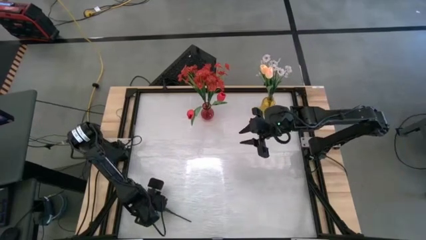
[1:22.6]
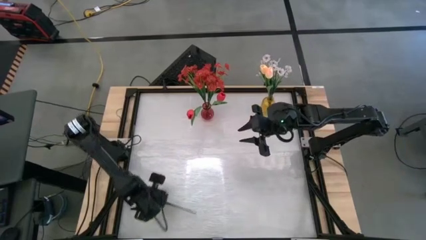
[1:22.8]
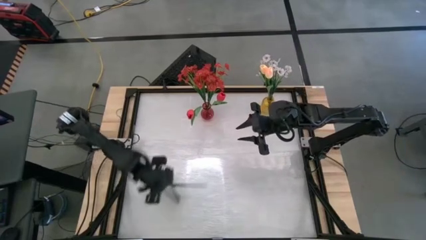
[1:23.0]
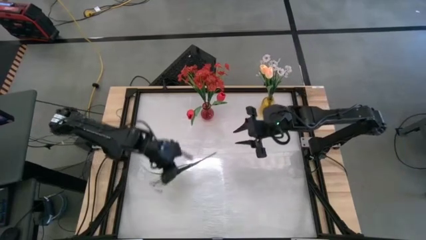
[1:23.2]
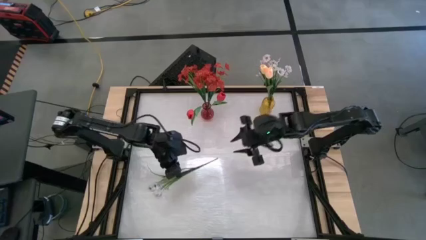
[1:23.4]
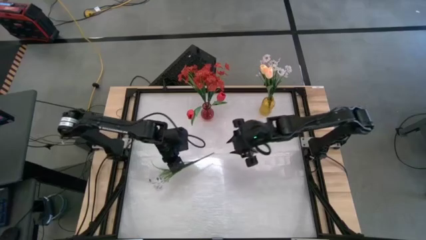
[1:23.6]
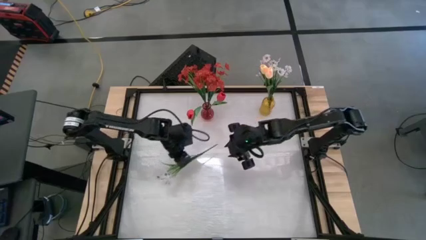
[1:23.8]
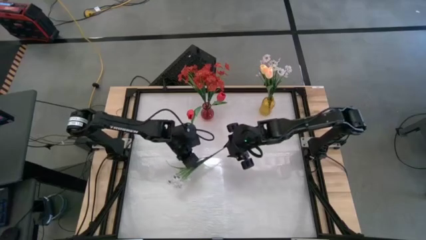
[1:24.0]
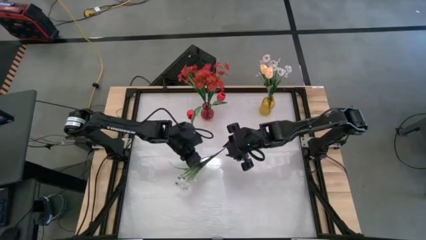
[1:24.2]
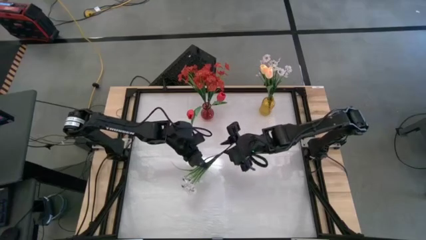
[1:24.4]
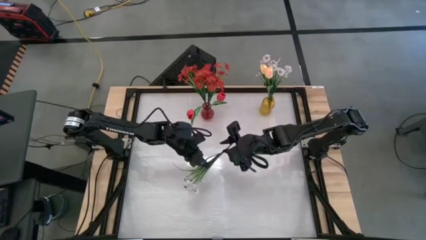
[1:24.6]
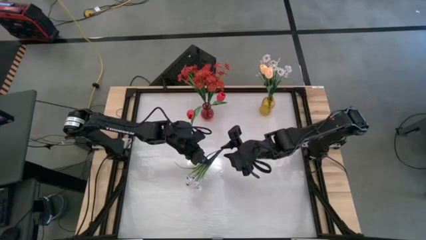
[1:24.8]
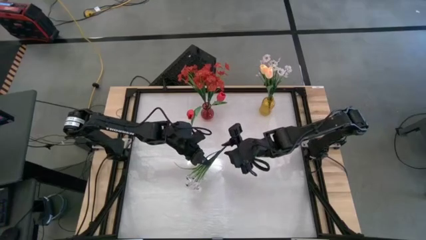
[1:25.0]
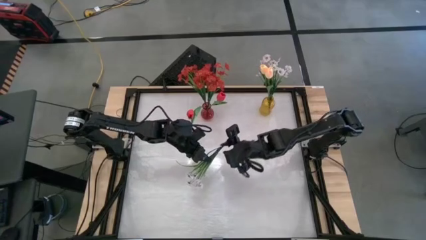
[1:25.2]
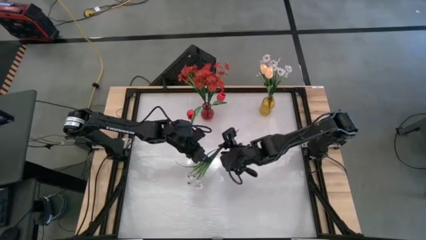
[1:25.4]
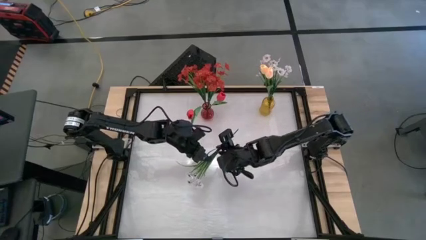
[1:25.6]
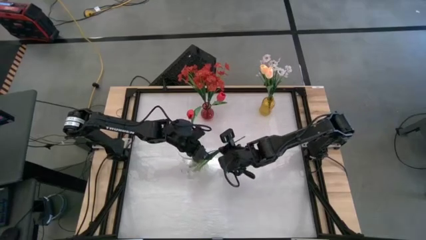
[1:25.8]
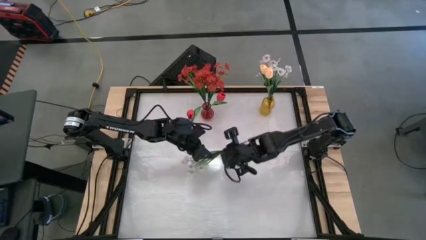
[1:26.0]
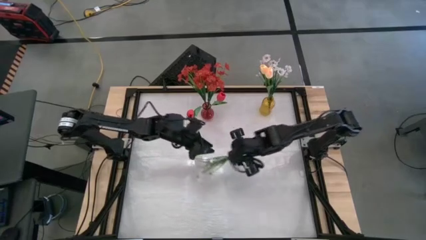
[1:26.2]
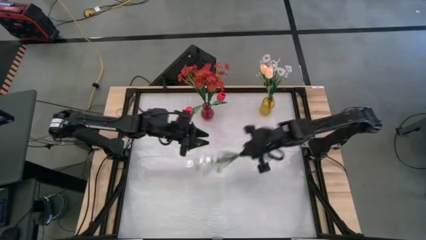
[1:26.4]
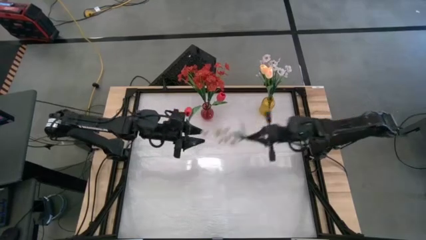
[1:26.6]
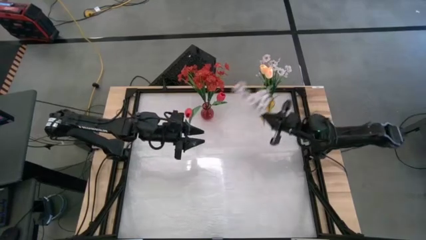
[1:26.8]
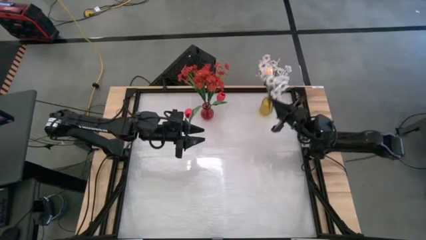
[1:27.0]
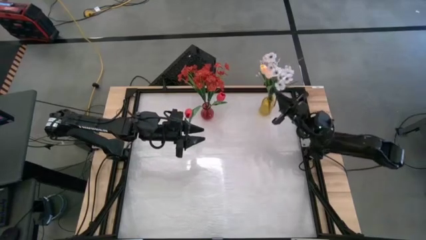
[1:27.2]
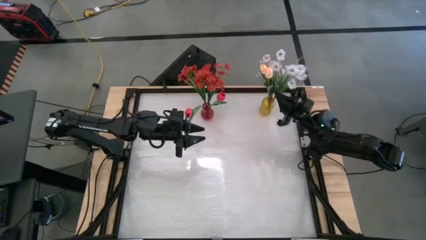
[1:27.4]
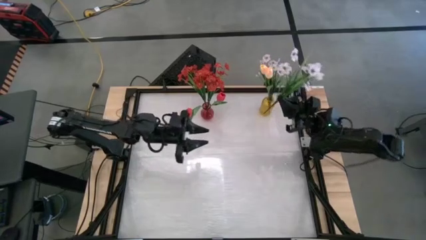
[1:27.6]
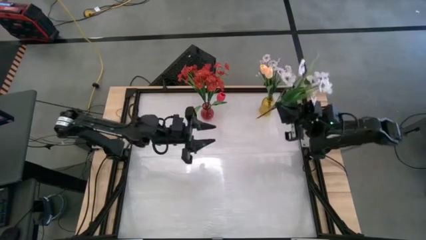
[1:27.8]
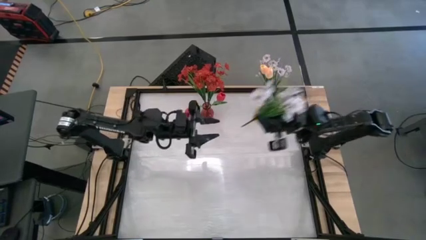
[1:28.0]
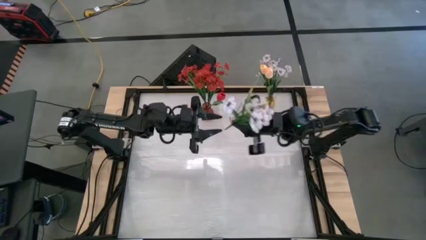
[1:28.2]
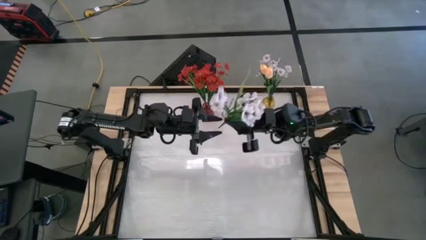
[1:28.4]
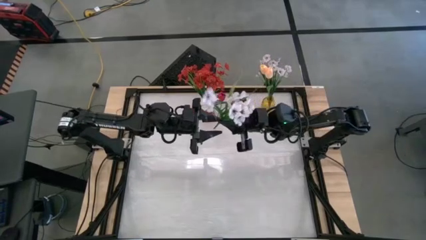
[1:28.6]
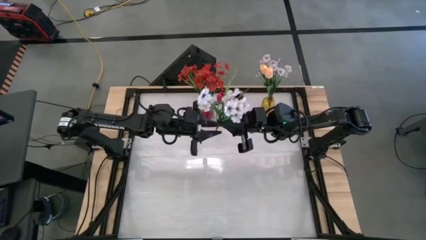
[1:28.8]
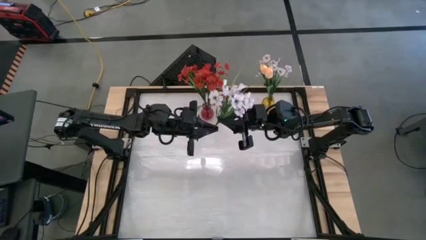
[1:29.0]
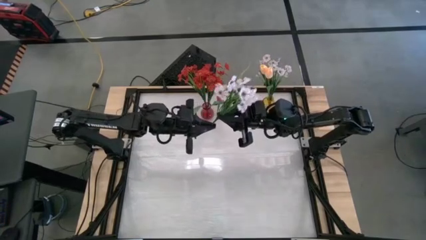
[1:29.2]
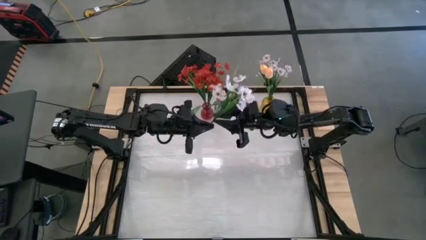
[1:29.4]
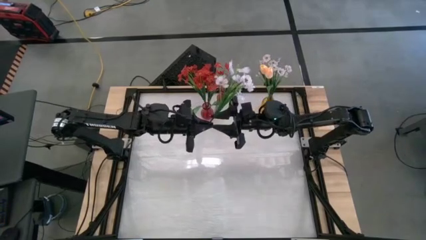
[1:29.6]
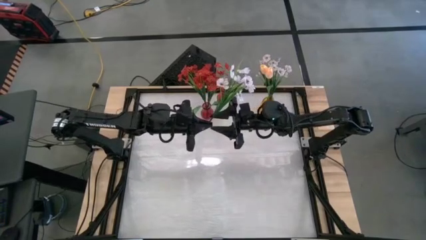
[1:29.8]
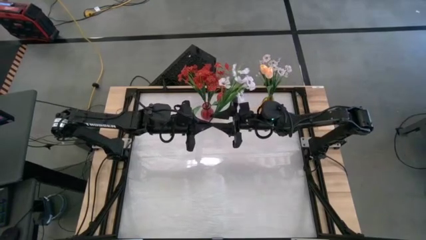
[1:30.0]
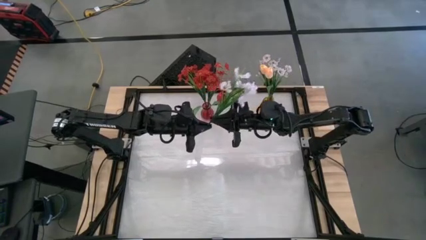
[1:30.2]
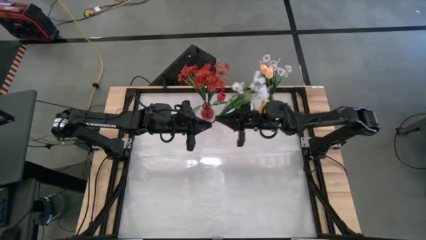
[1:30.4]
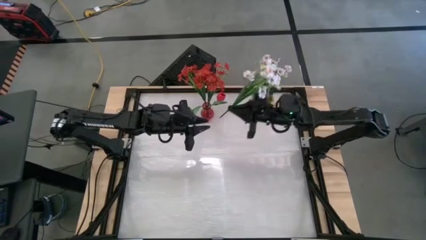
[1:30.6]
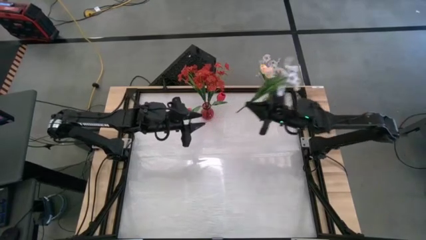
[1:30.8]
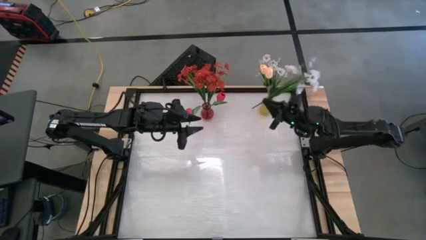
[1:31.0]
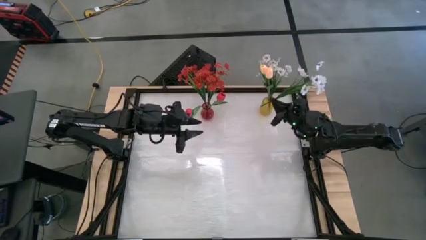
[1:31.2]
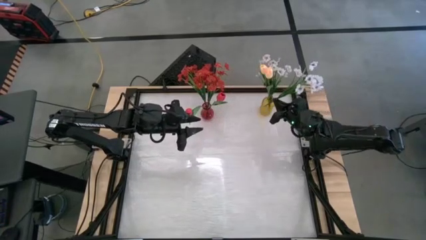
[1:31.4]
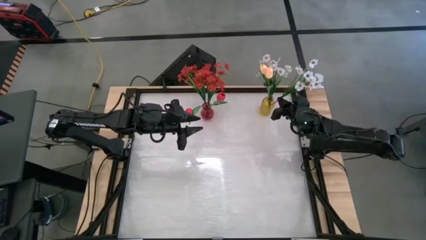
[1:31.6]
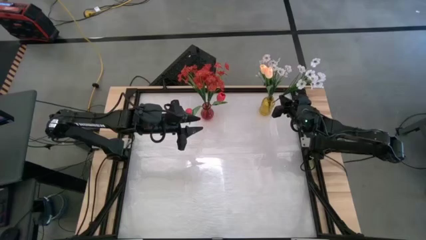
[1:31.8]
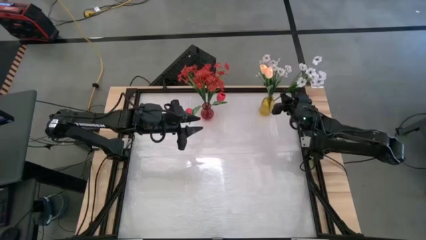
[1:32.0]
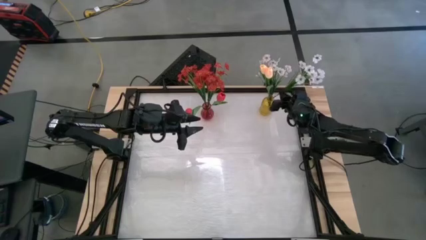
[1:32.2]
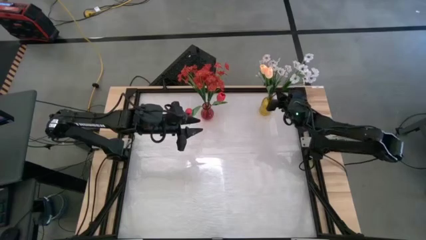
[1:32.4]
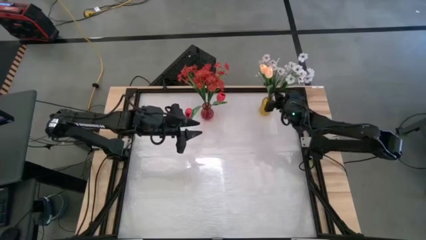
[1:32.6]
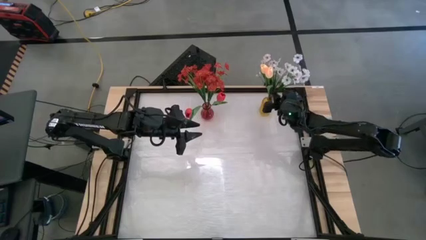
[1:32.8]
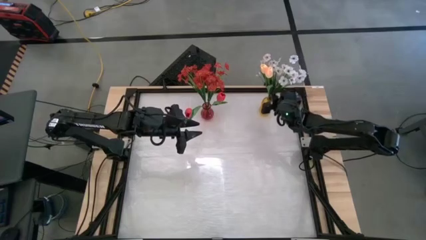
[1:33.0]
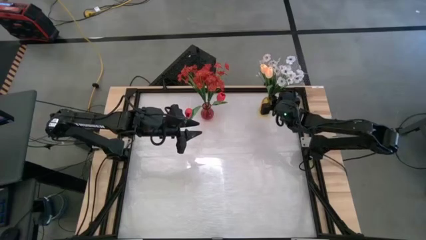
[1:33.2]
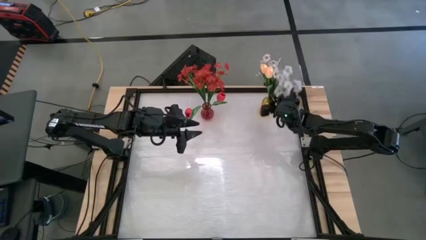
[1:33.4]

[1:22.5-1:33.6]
Task: Sort flowers into vase by color
Put the white flowers into the yellow vase

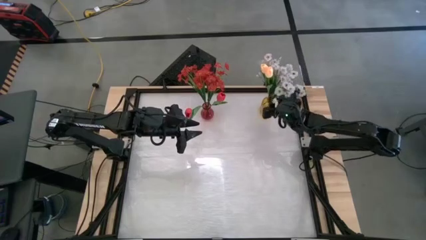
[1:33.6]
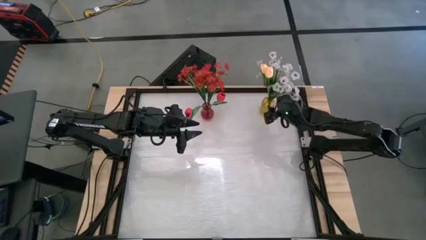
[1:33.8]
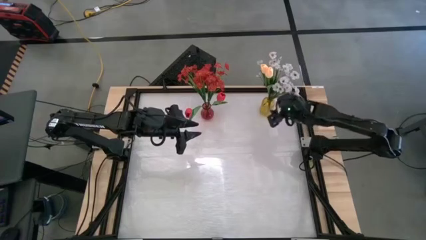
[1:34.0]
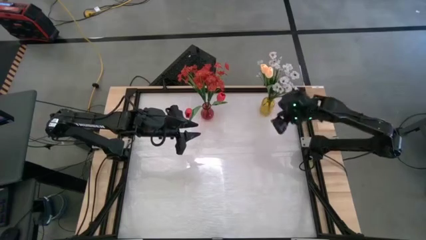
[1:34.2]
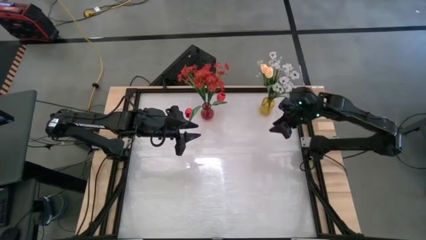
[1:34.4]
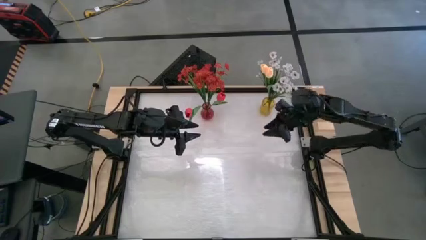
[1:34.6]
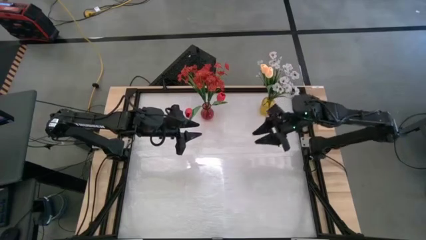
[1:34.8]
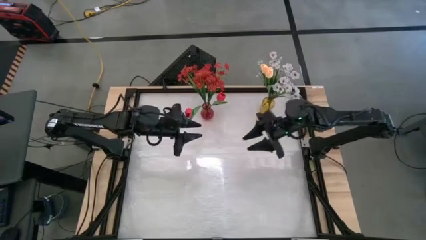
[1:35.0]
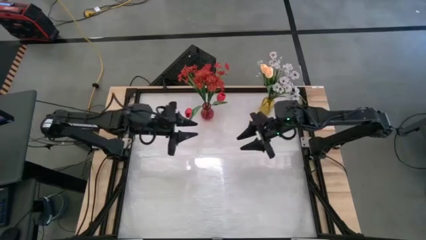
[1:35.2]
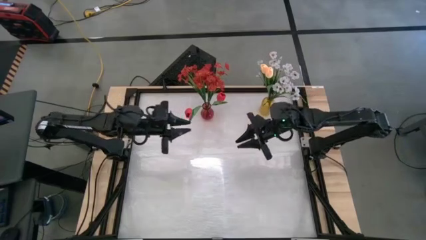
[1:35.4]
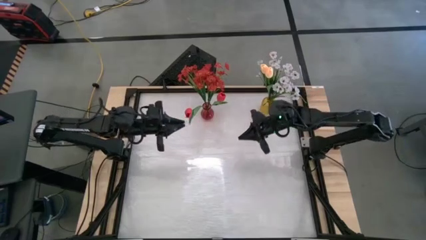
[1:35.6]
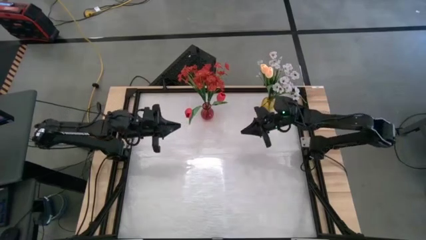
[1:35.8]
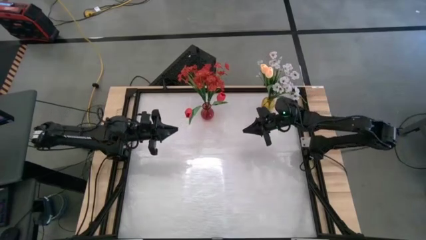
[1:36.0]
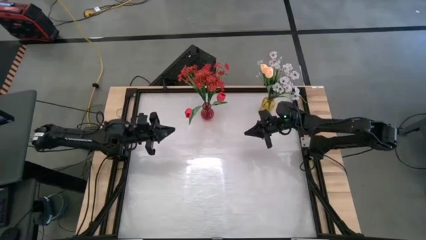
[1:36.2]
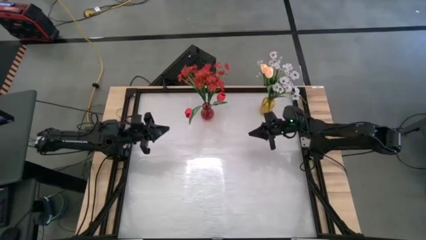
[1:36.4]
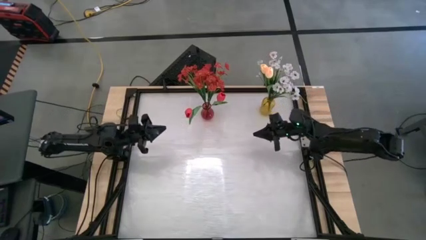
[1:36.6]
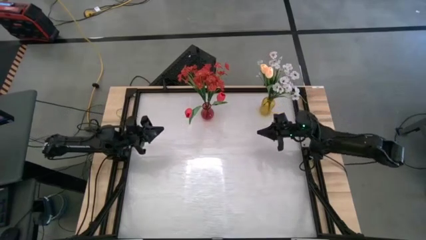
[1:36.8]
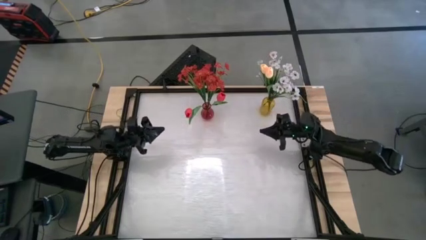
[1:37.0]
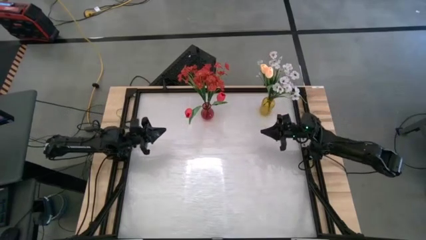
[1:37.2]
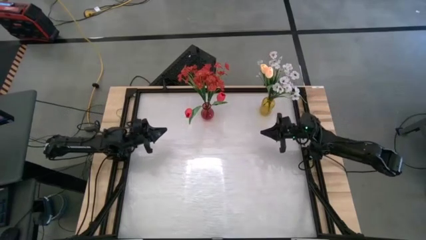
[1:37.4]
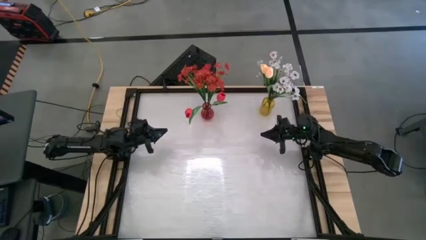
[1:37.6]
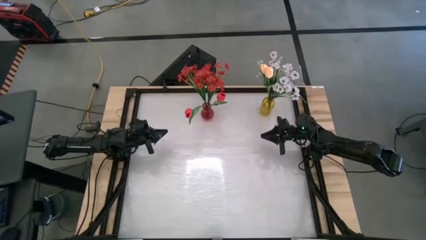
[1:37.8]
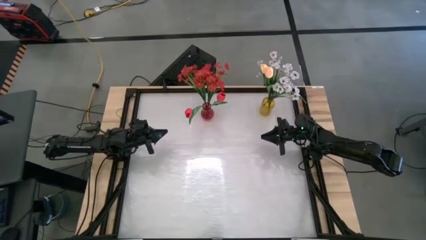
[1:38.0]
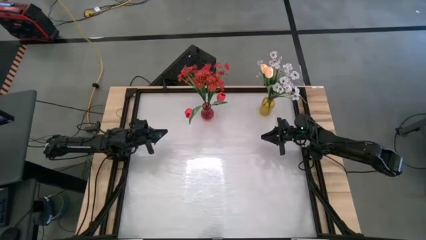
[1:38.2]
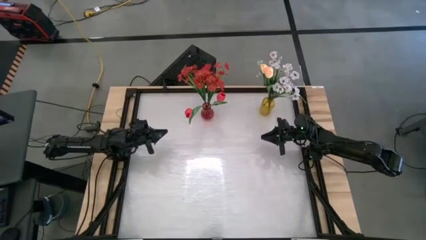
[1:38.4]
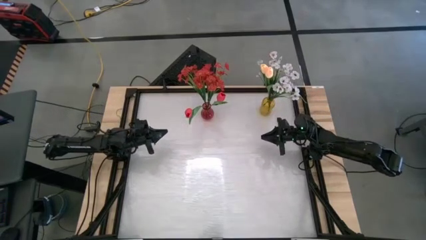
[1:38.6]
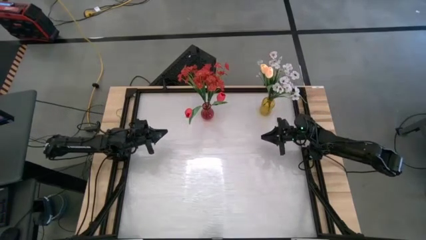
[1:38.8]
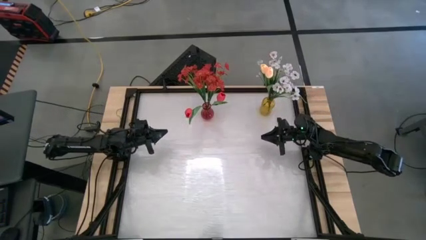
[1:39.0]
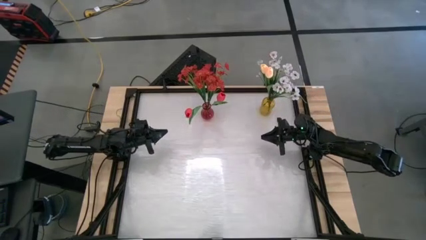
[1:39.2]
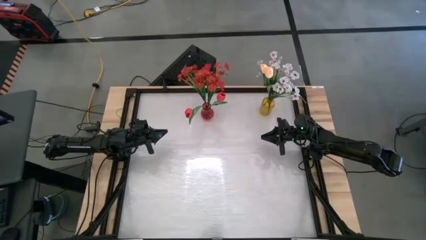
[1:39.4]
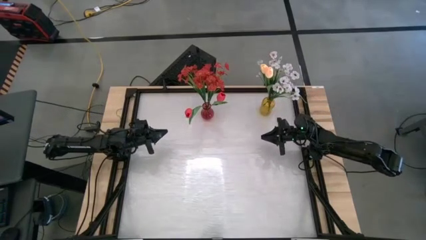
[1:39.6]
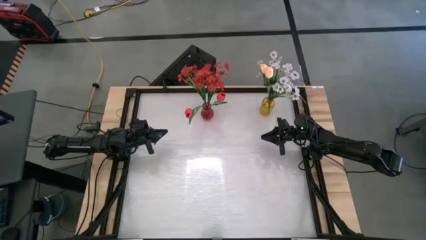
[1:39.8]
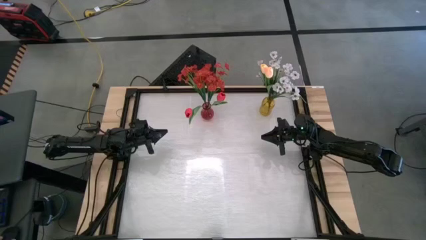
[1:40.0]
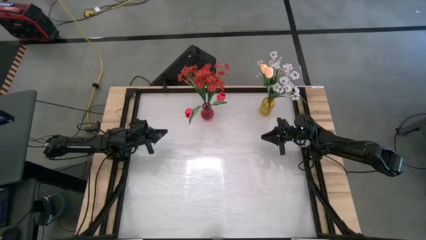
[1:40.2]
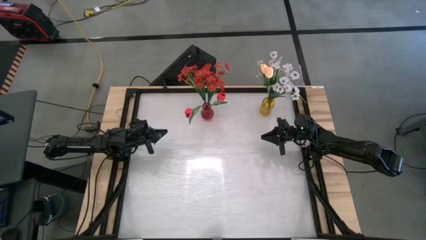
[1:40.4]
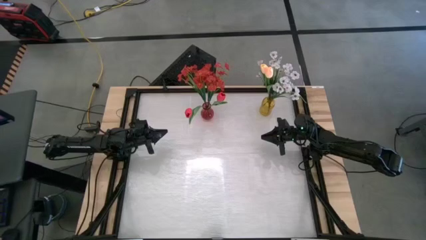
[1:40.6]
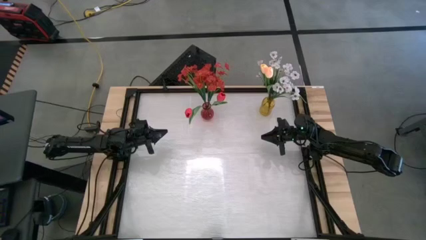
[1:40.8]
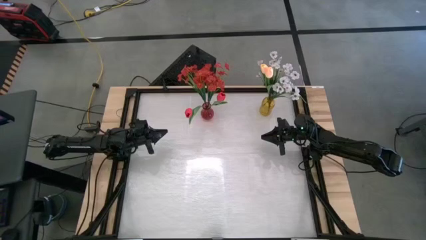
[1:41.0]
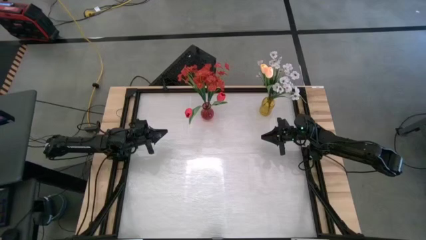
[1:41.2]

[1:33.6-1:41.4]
Return to Home Position
